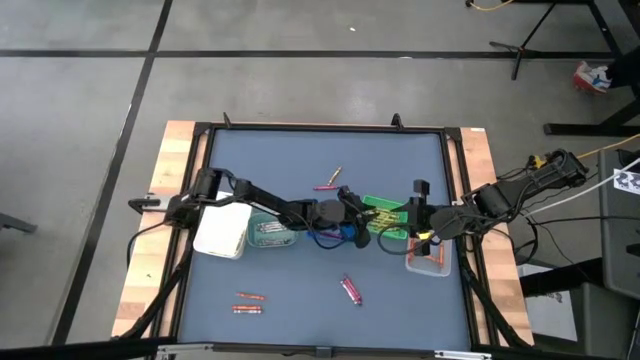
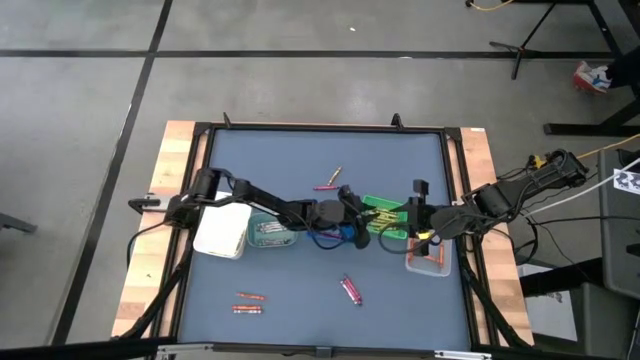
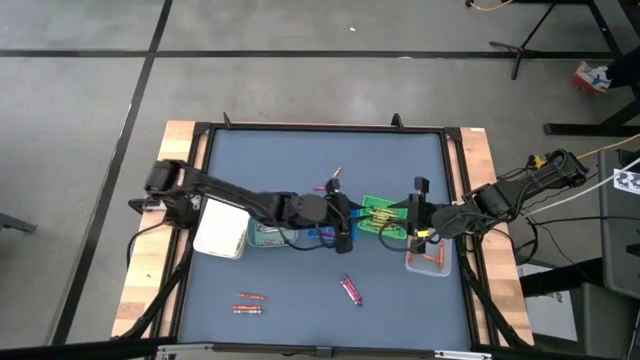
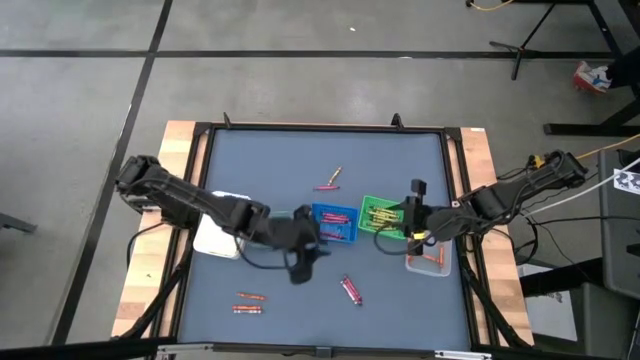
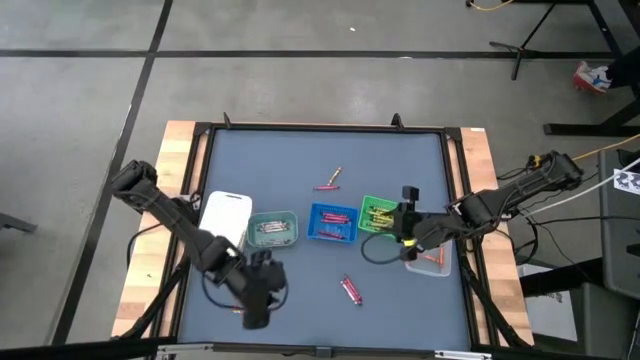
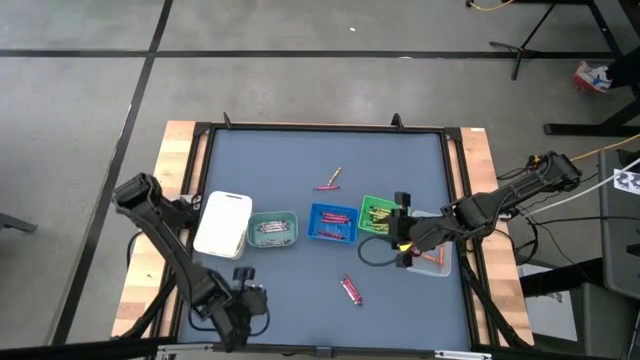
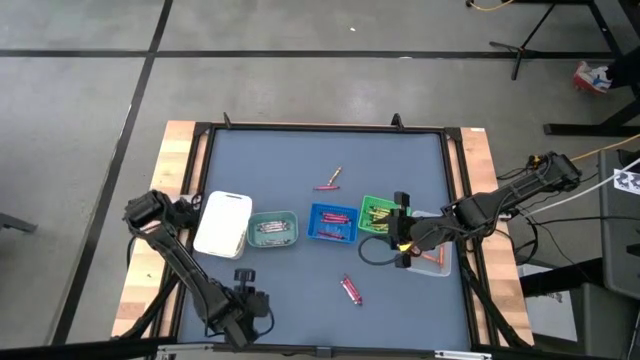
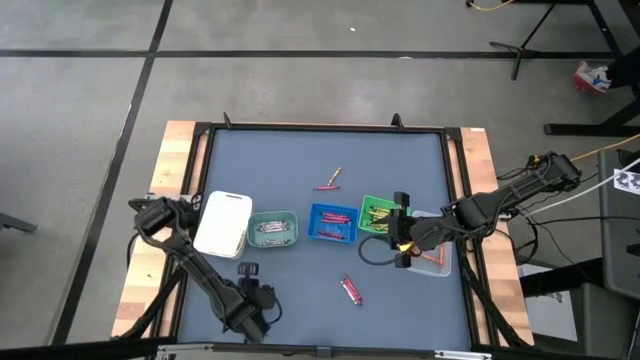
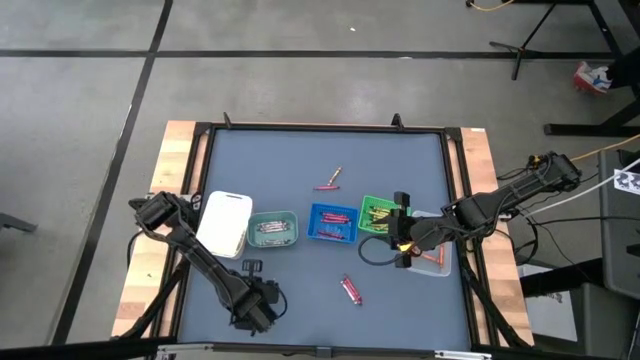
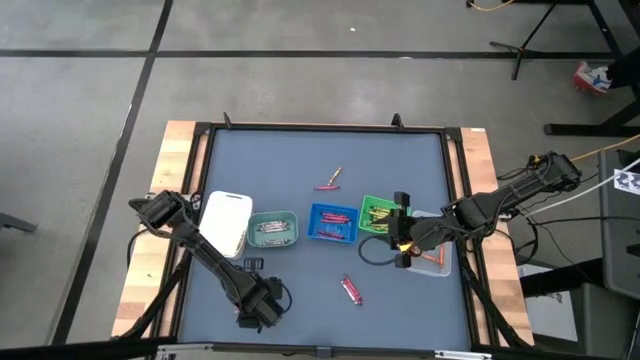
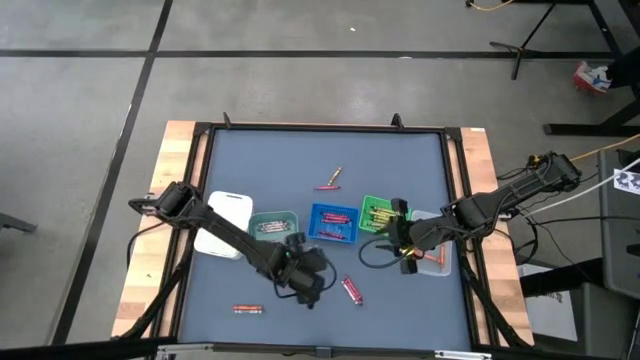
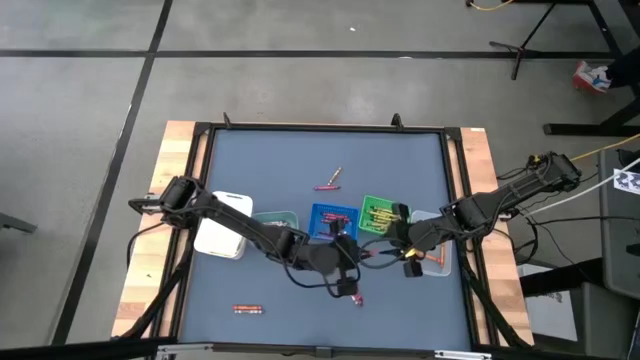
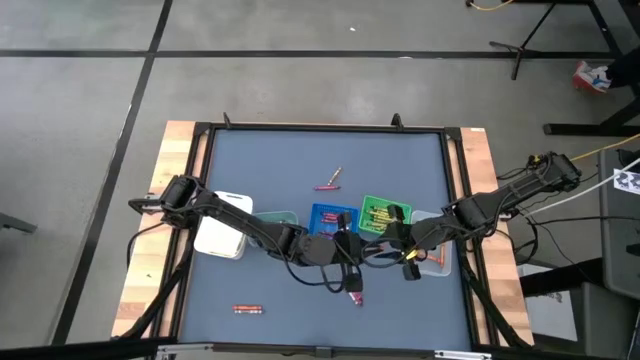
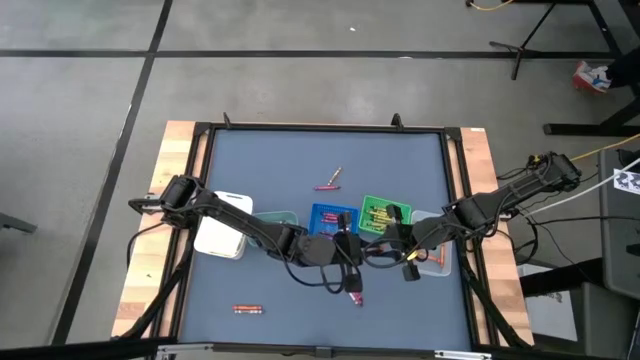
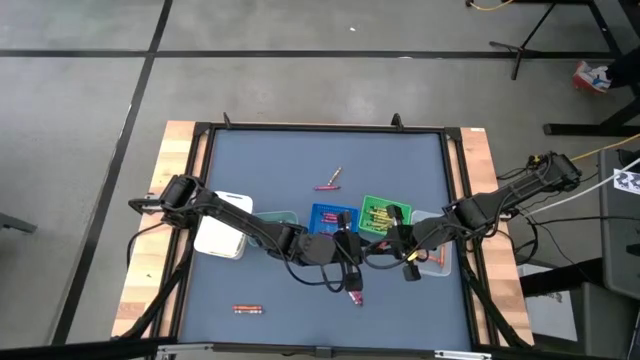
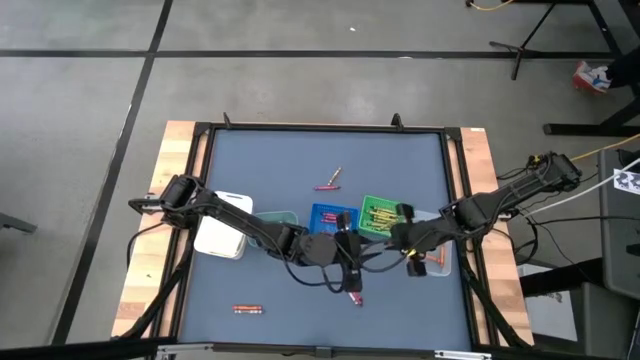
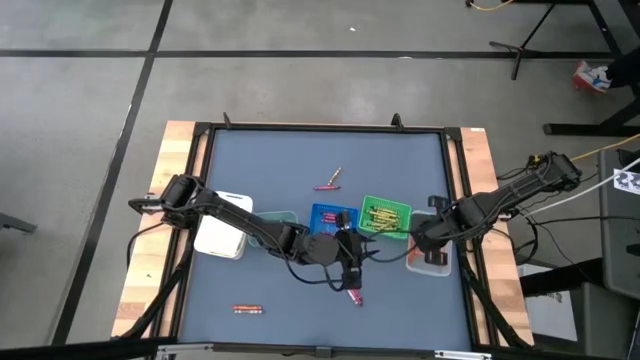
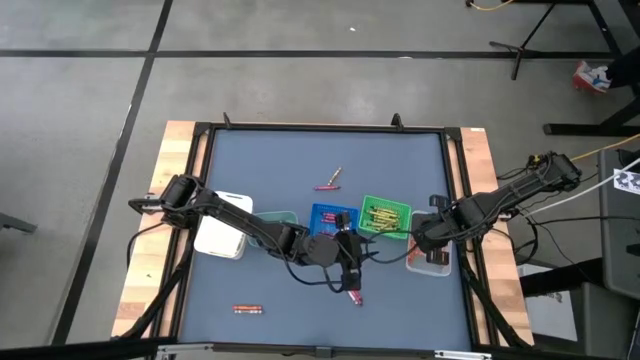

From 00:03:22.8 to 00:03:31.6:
Task: Sort crayons
Put the orange crayon into the transparent bin

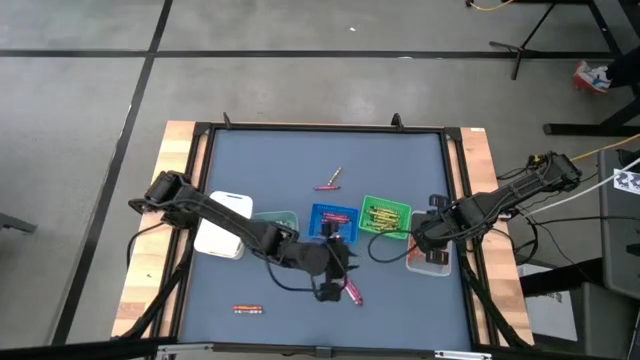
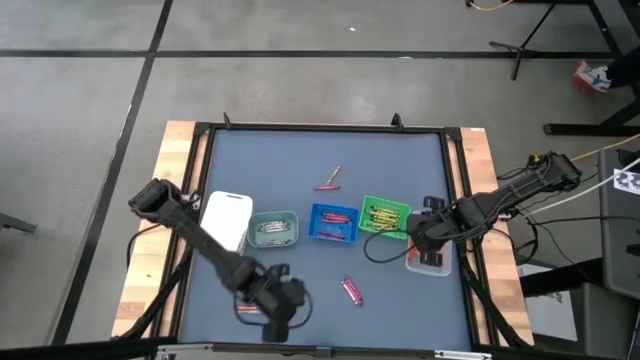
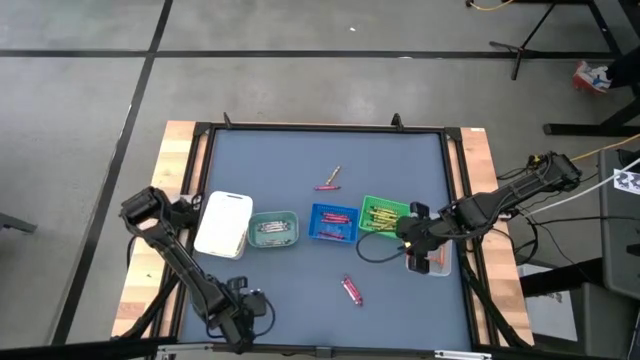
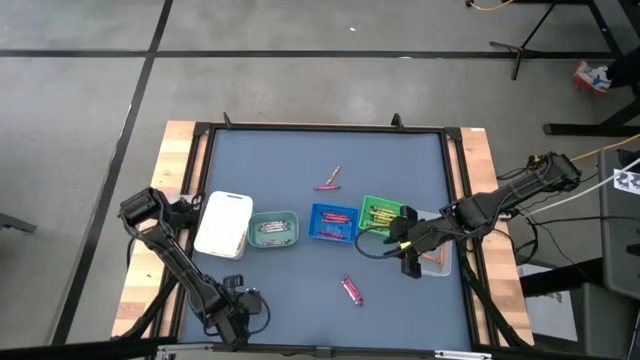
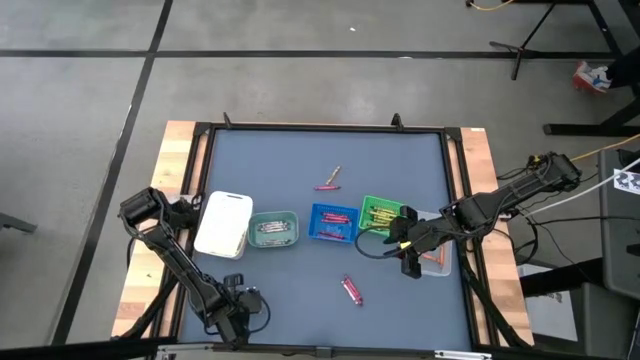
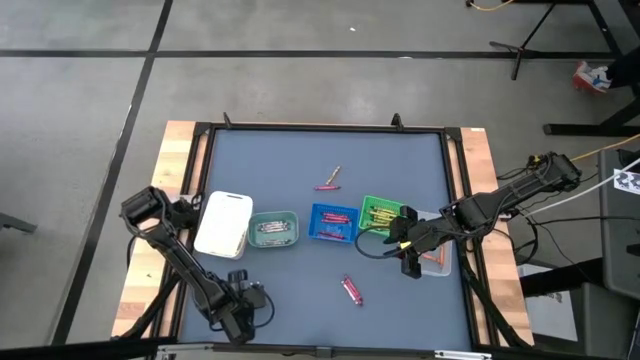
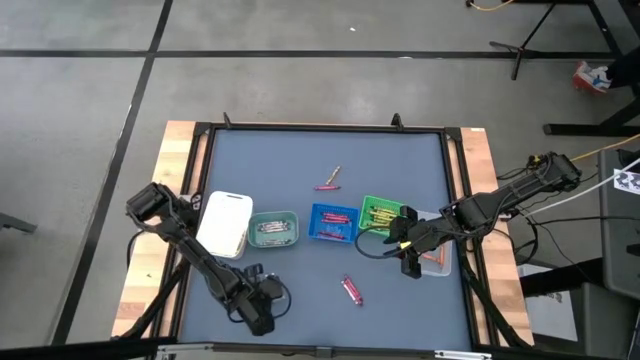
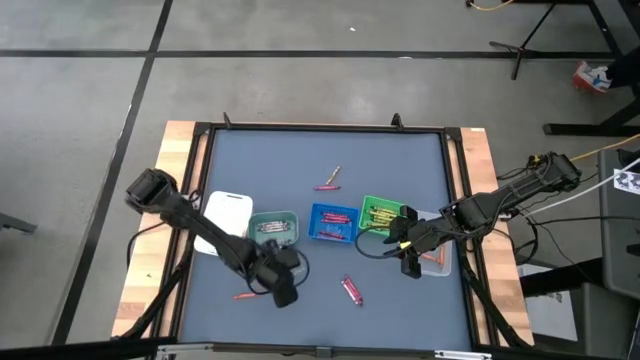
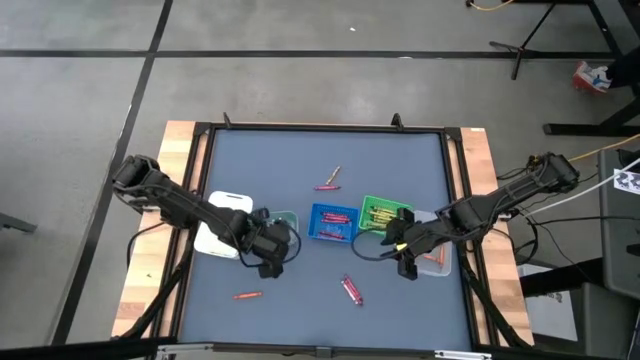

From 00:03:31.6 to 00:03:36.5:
Put the gray crayon into the light green bin

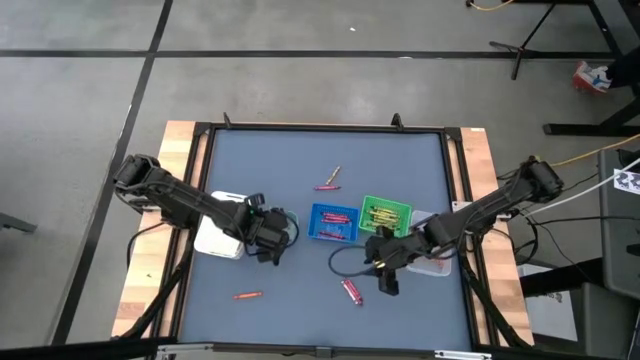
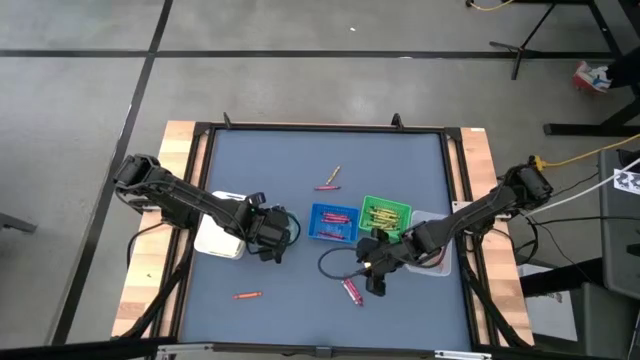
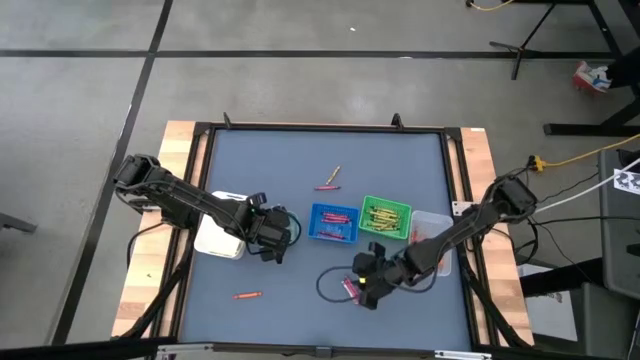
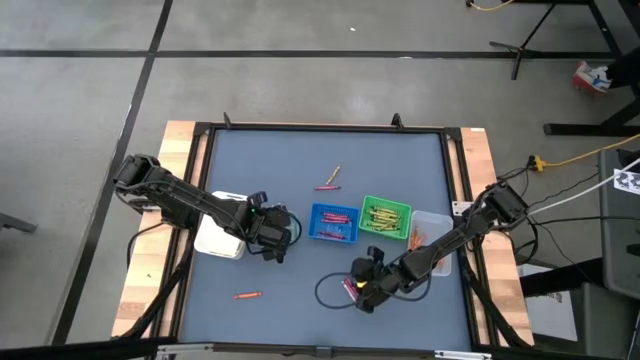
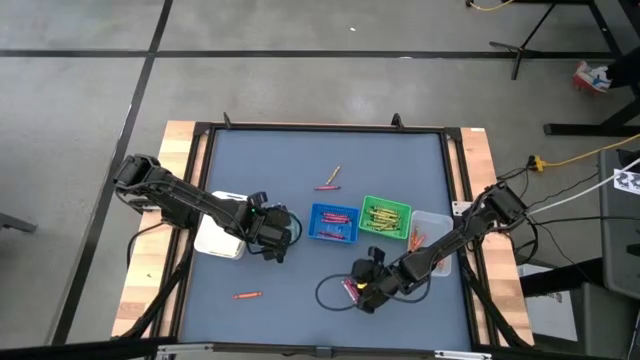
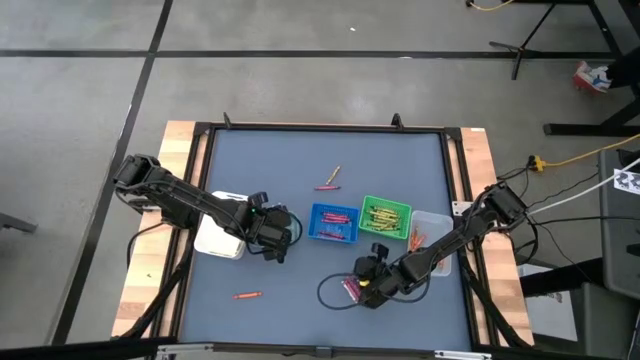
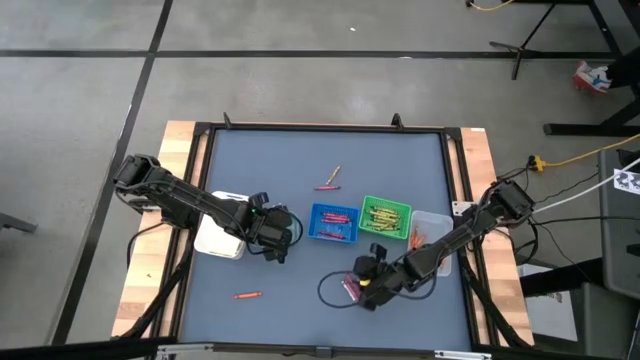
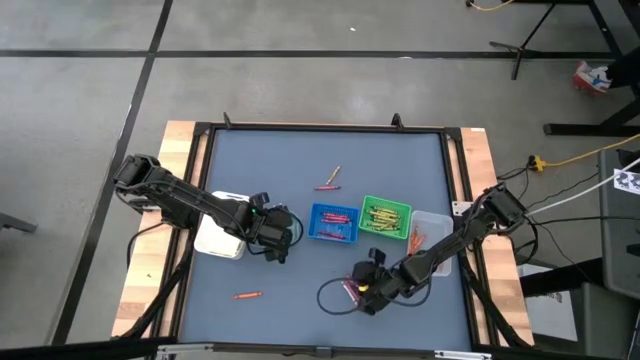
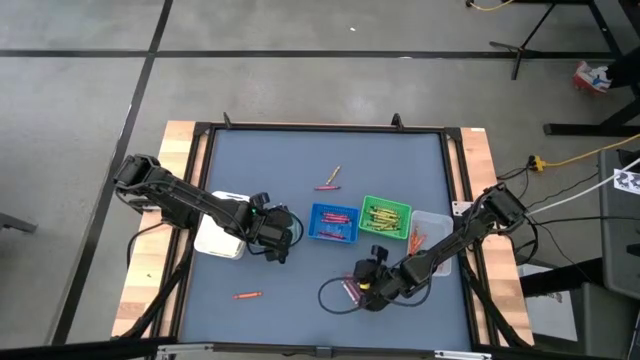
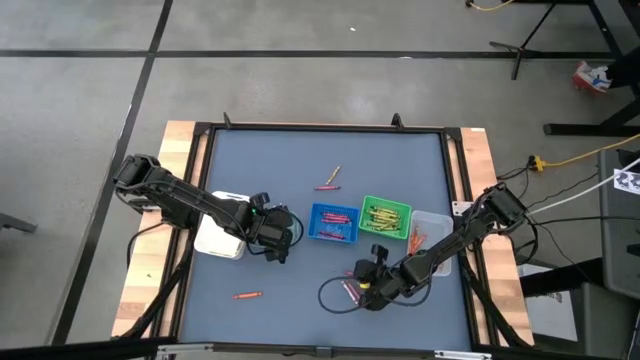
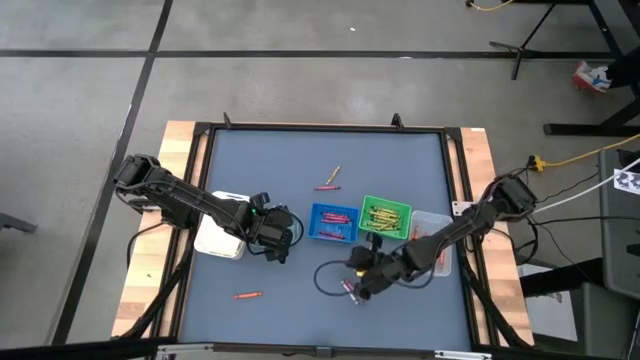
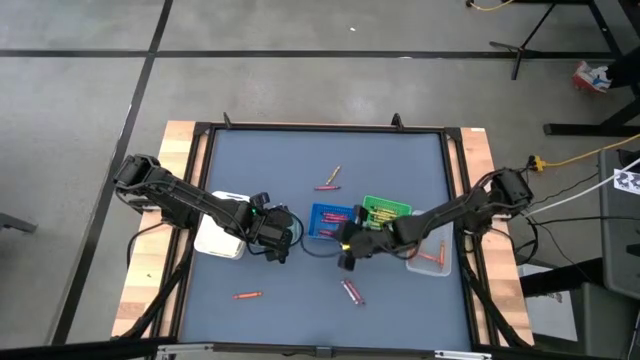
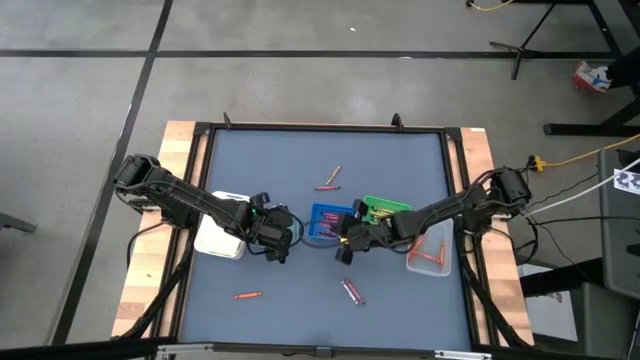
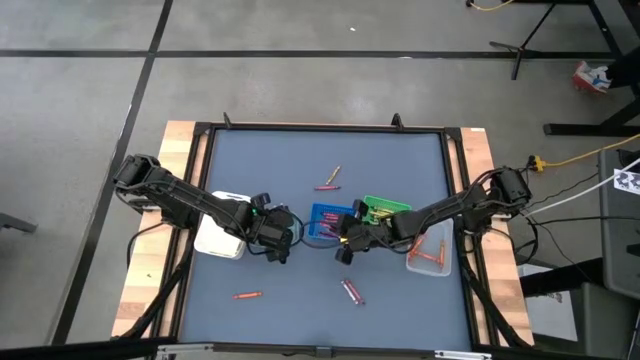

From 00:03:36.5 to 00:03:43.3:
Put the red crayon into the blue bin

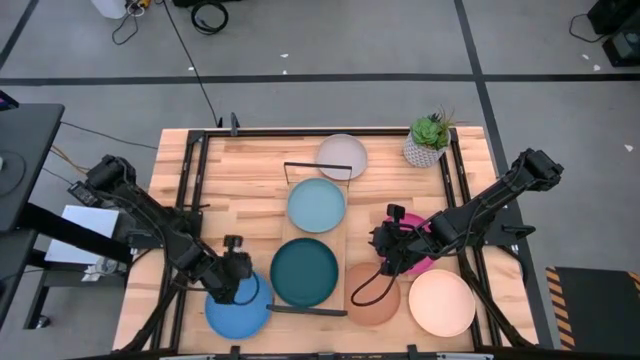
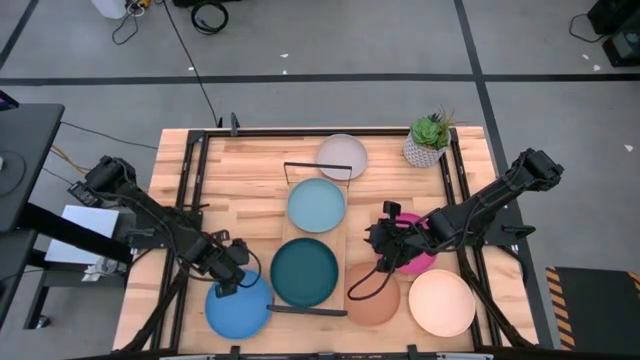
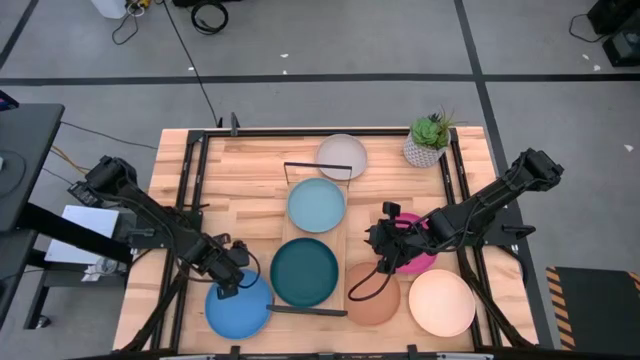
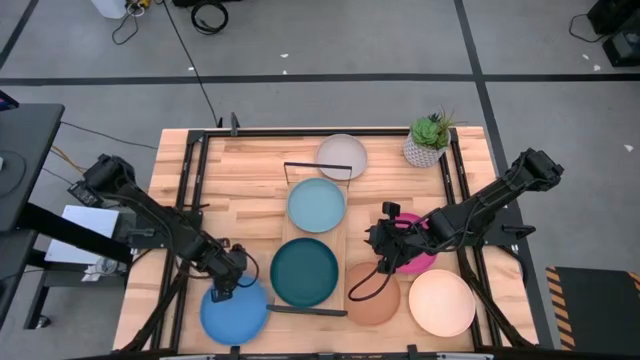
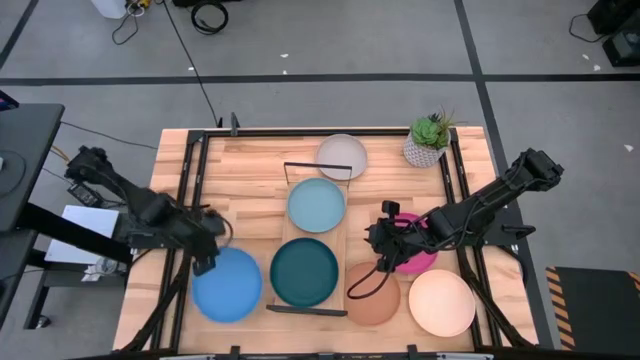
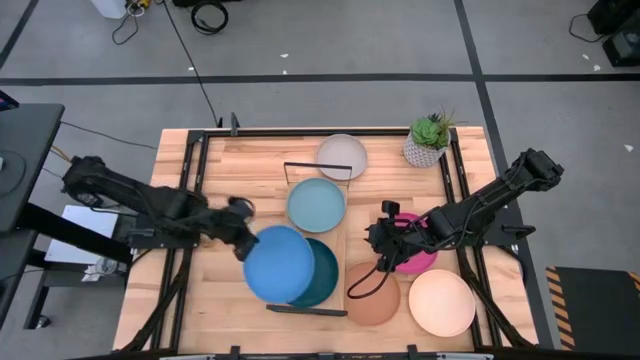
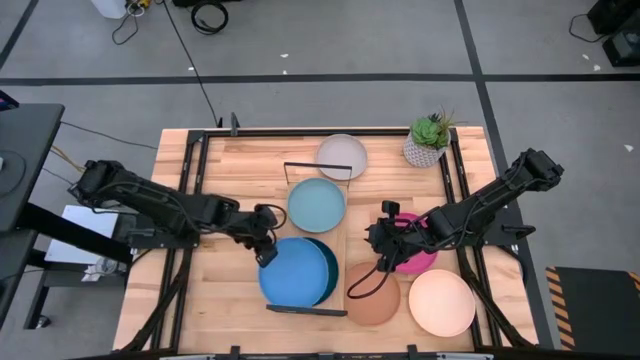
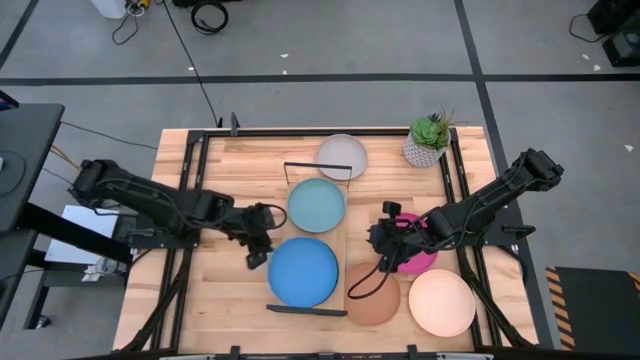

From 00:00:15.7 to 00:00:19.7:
Task: Place and stack plates onto a shelf
Stack the blue plate on top of the dark blue plate on the shelf
